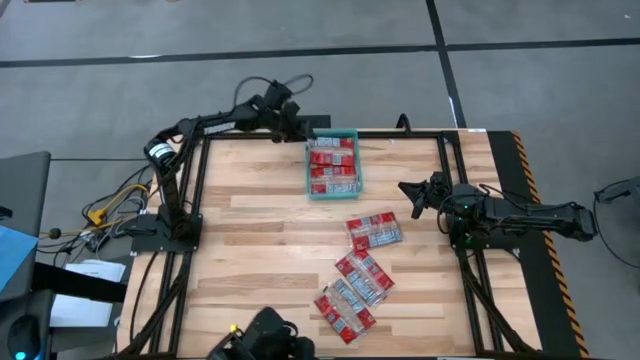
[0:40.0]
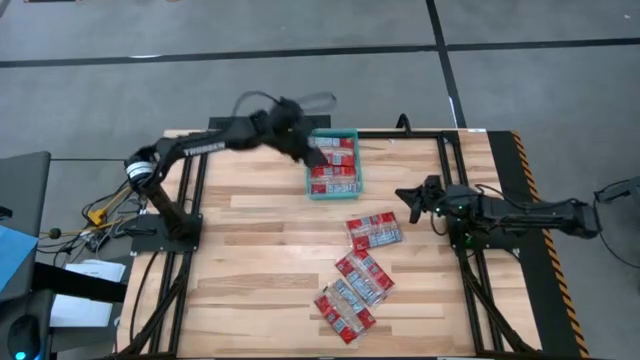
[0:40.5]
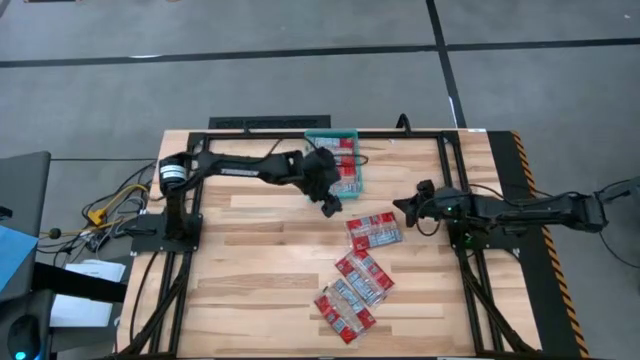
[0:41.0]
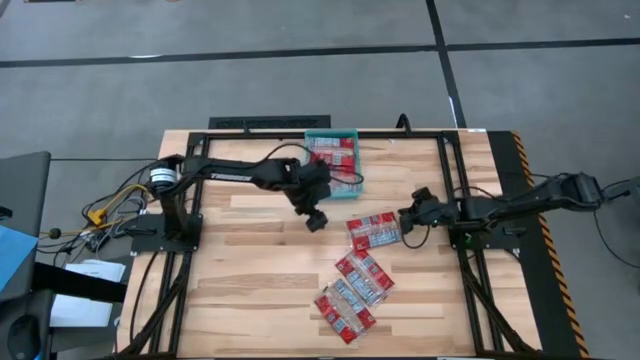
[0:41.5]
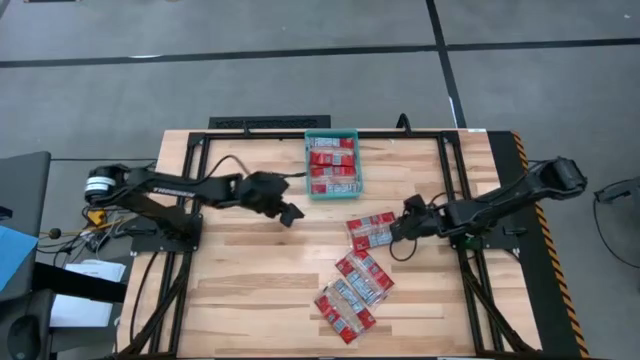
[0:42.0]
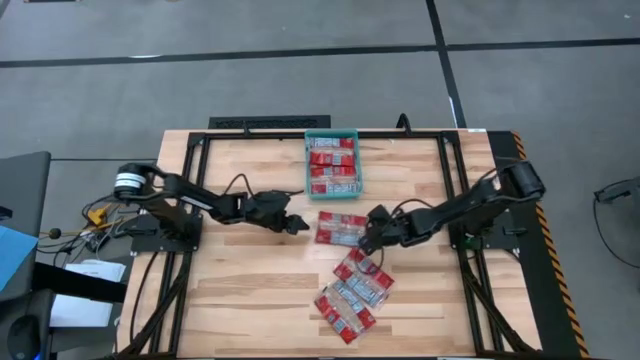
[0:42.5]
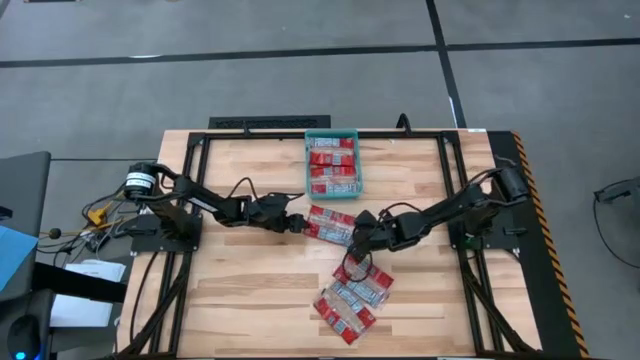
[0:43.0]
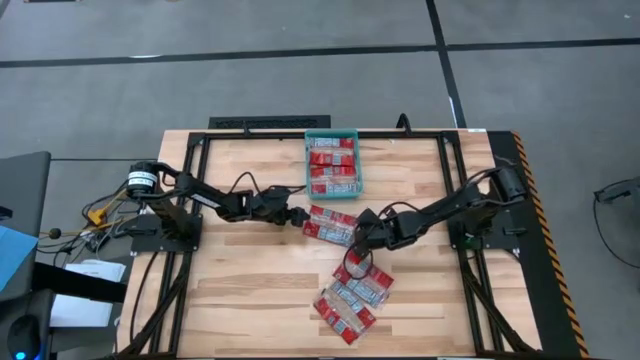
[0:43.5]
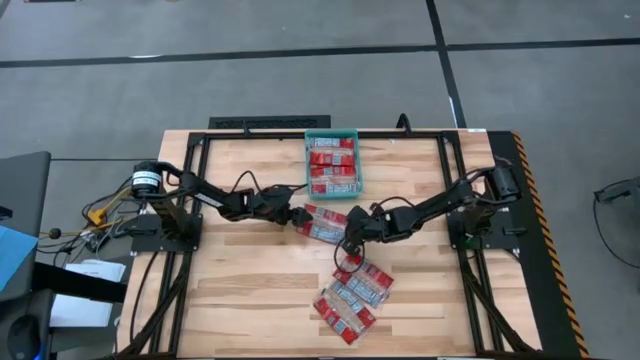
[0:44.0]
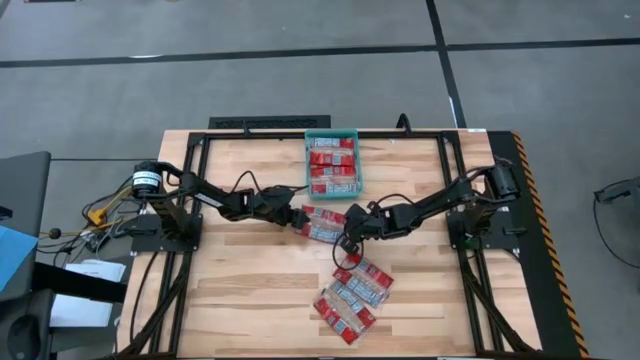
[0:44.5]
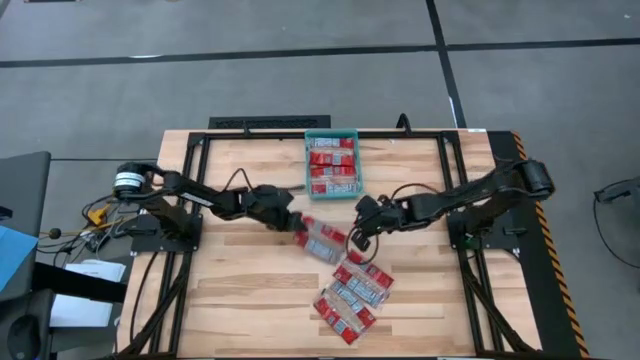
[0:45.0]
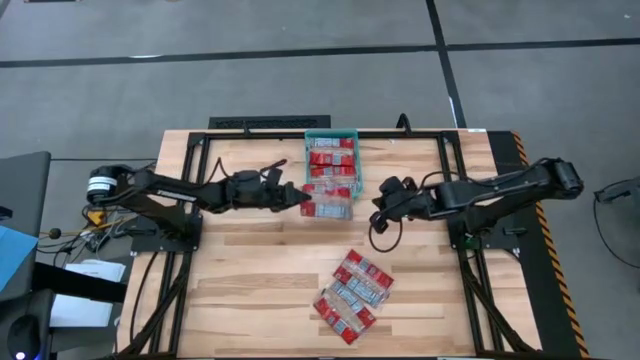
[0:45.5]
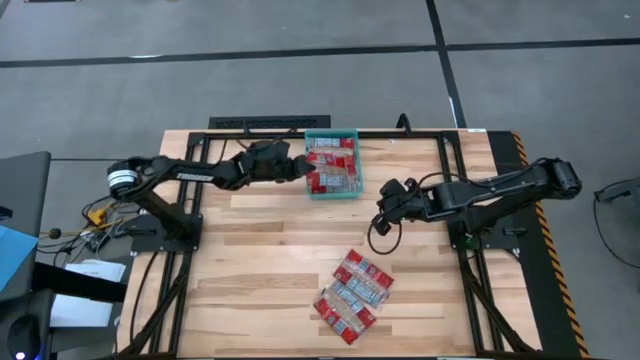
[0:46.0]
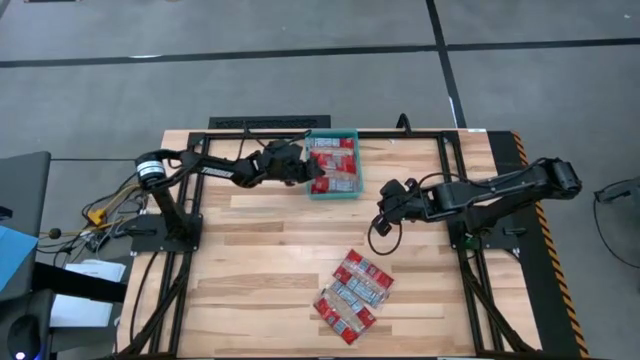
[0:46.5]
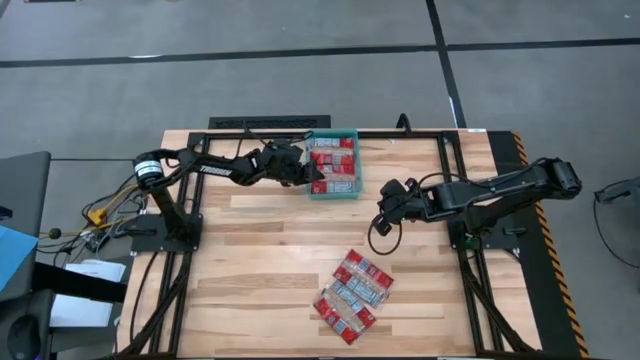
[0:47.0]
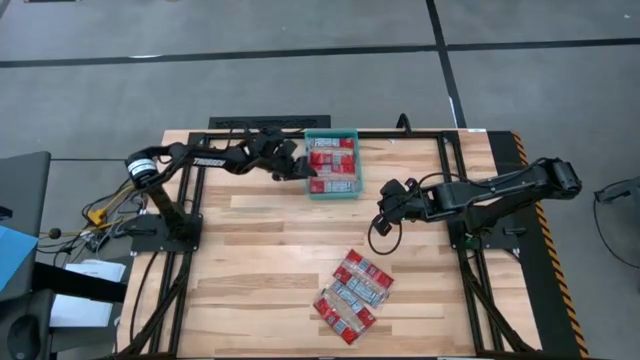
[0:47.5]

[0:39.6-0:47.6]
Task: Sort popcorn bags into baskets
Put the red popcorn bag into the green bin

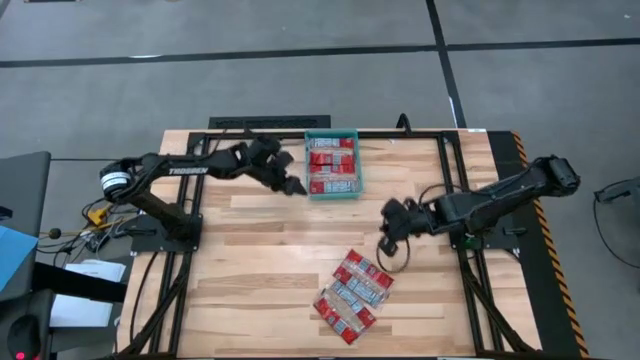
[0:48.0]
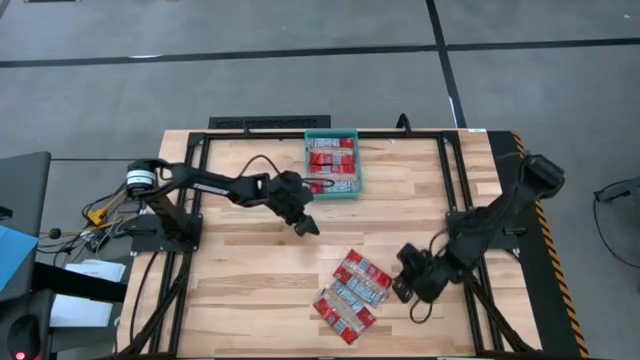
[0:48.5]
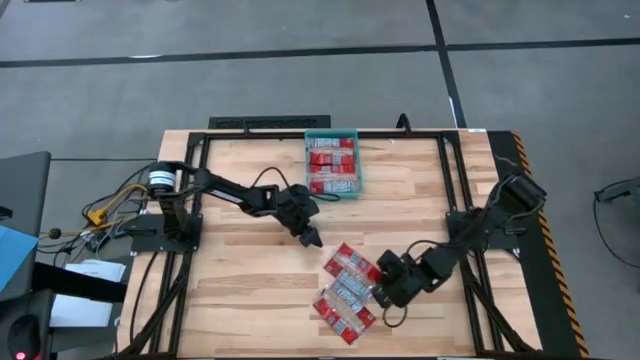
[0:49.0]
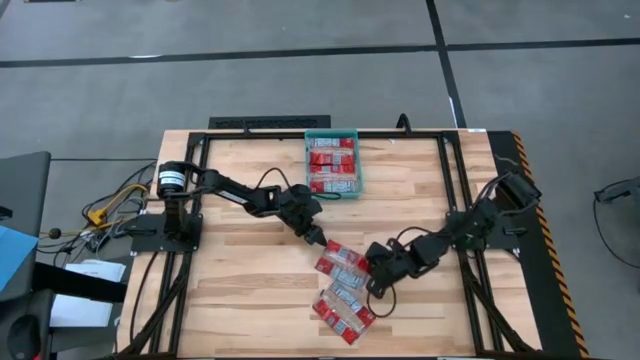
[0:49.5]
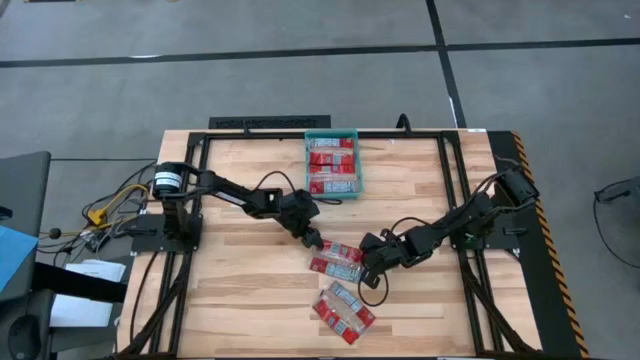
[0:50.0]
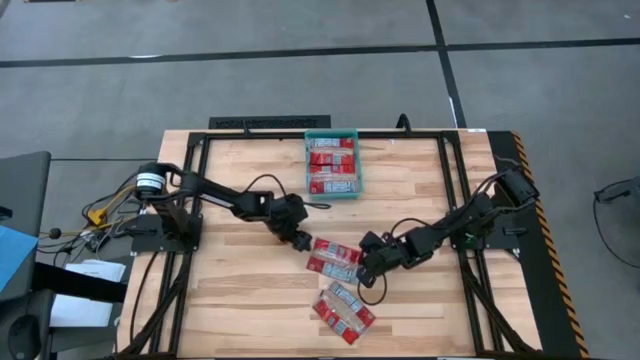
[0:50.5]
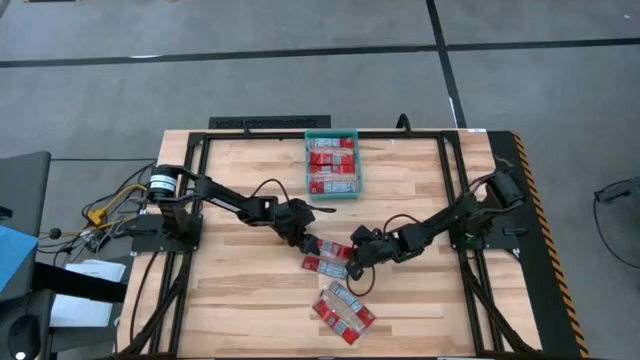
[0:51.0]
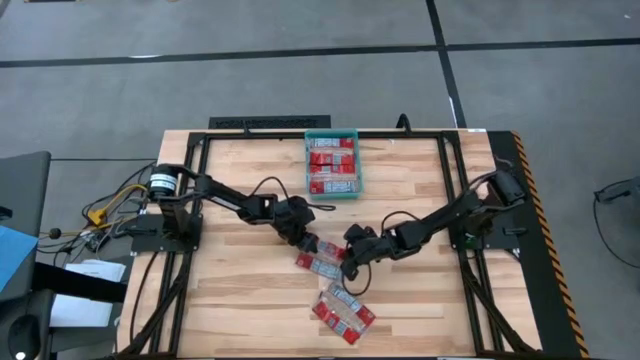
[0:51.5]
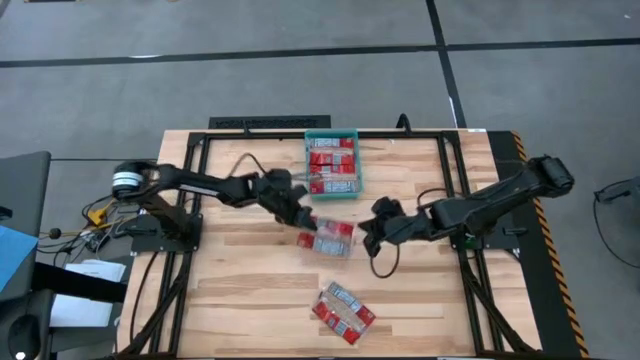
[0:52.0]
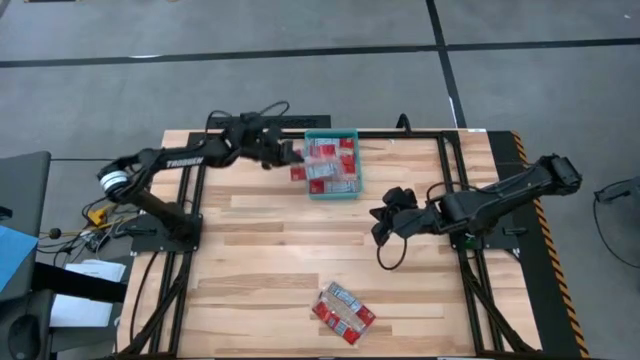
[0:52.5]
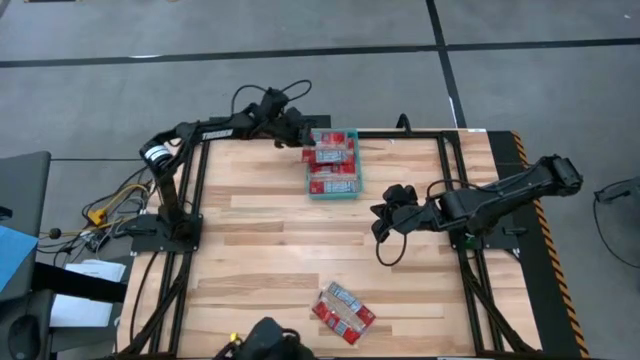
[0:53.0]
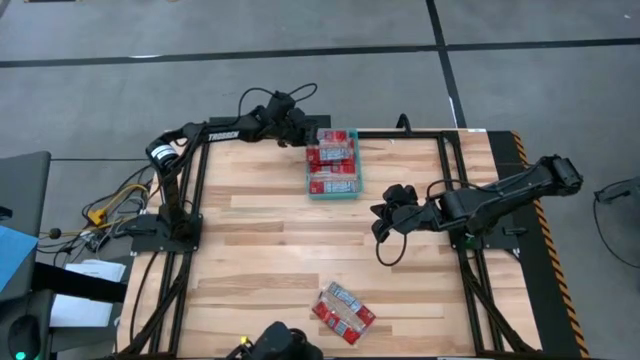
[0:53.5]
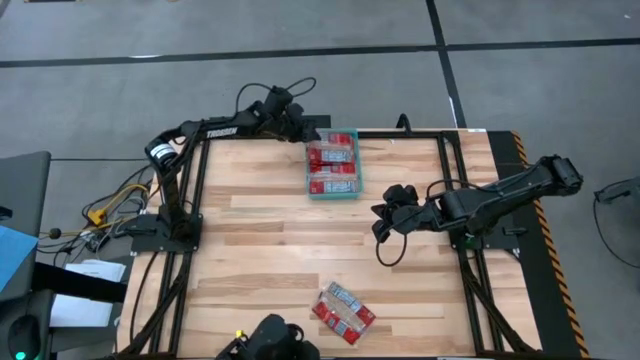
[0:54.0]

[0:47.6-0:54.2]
Put the red popcorn bag into the green bin

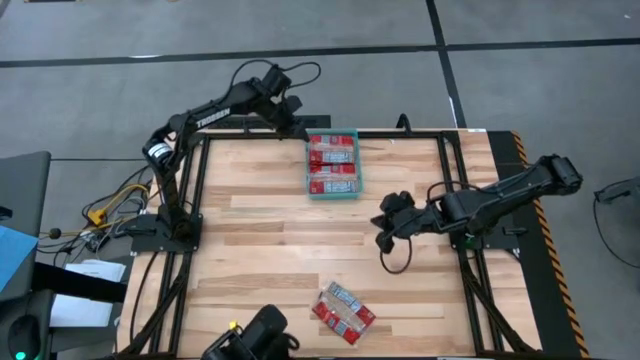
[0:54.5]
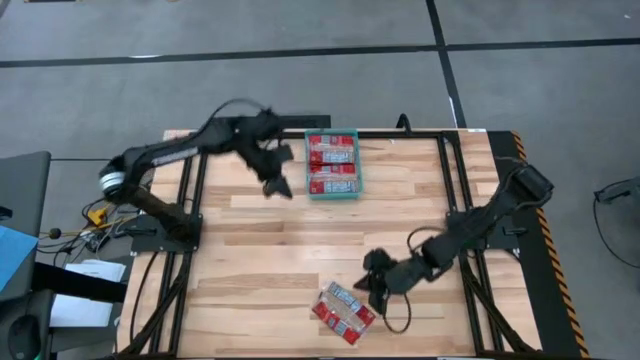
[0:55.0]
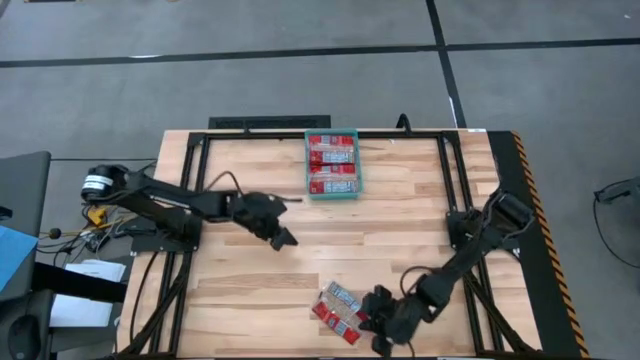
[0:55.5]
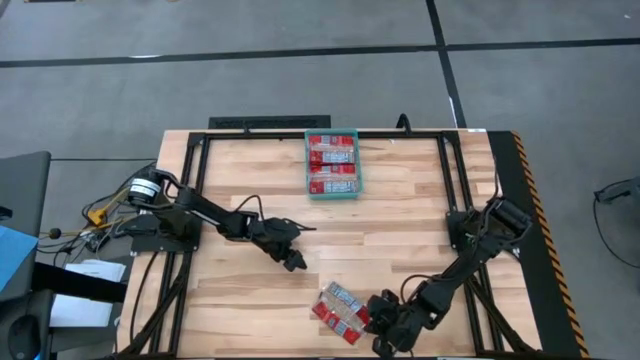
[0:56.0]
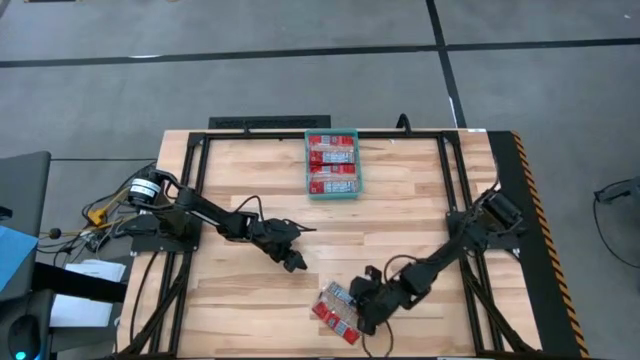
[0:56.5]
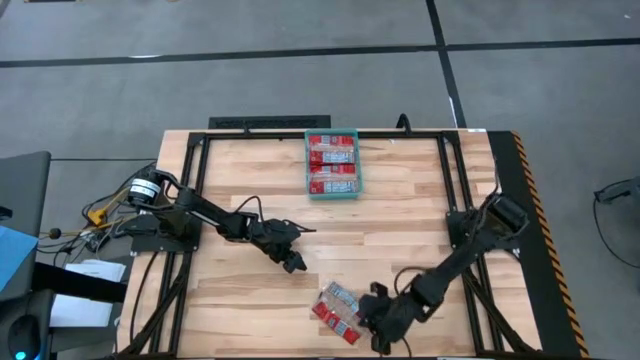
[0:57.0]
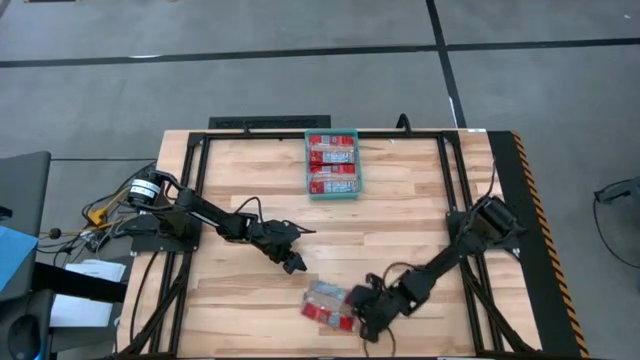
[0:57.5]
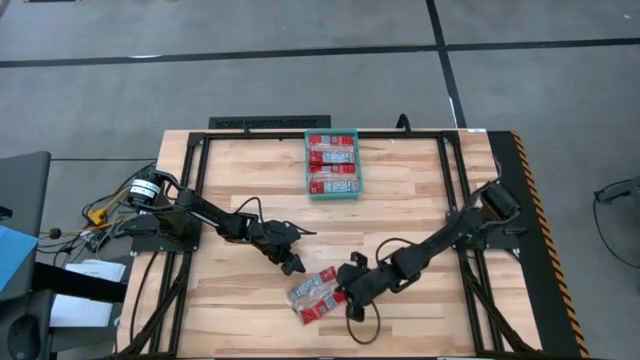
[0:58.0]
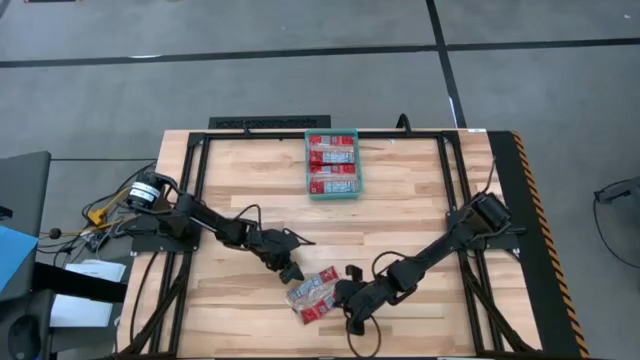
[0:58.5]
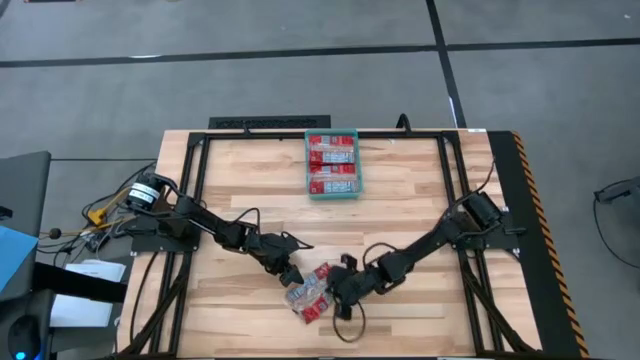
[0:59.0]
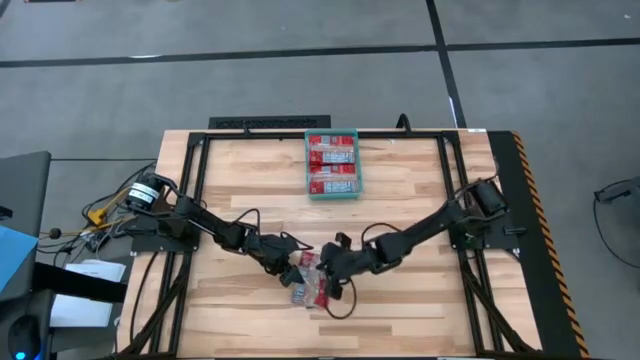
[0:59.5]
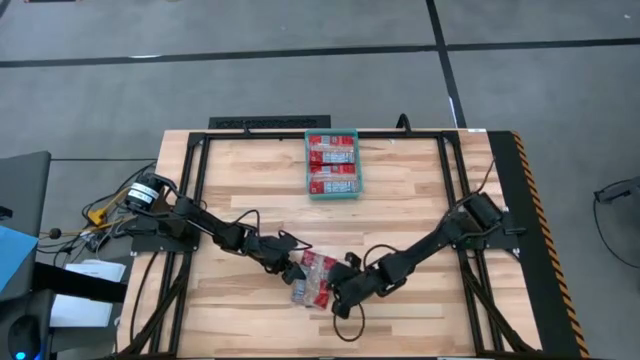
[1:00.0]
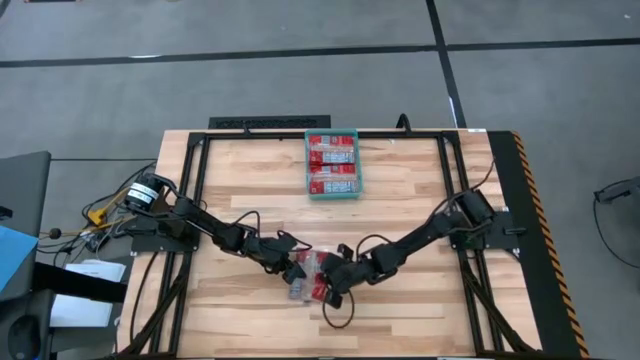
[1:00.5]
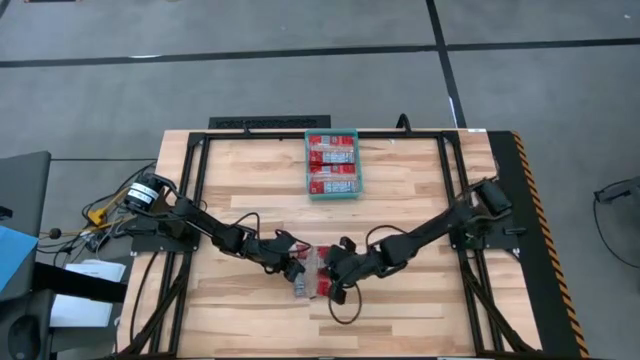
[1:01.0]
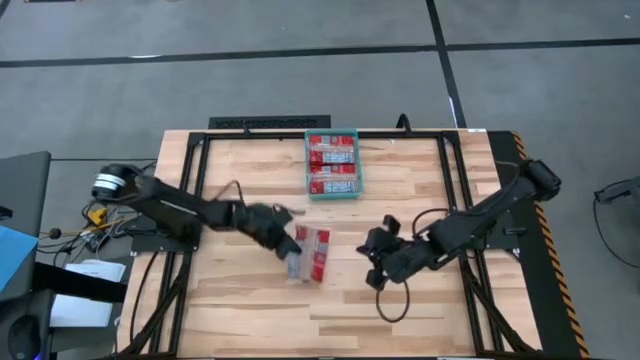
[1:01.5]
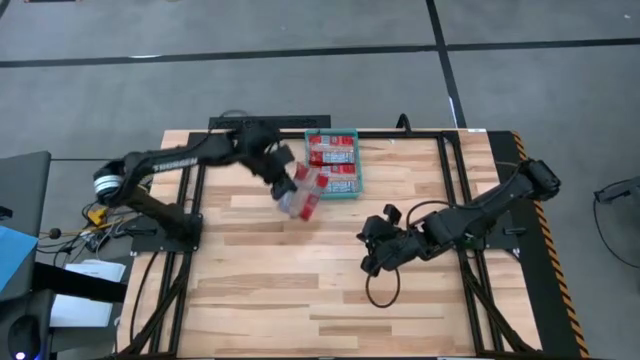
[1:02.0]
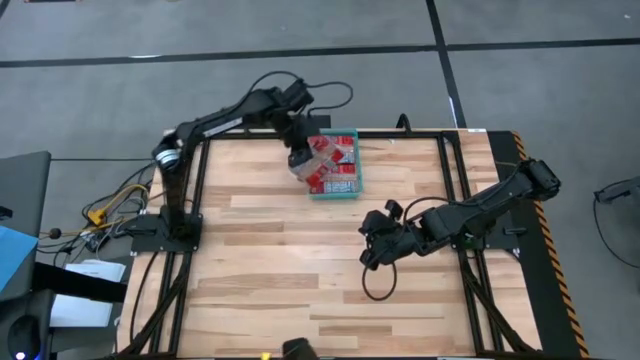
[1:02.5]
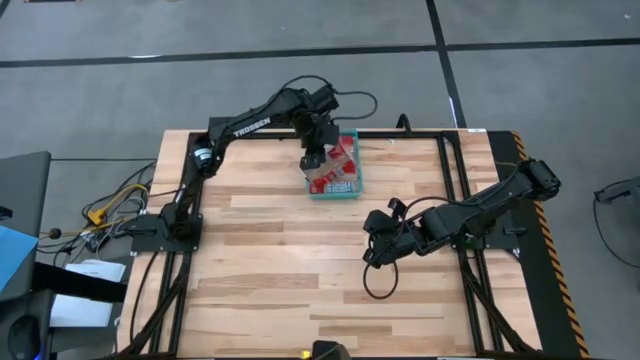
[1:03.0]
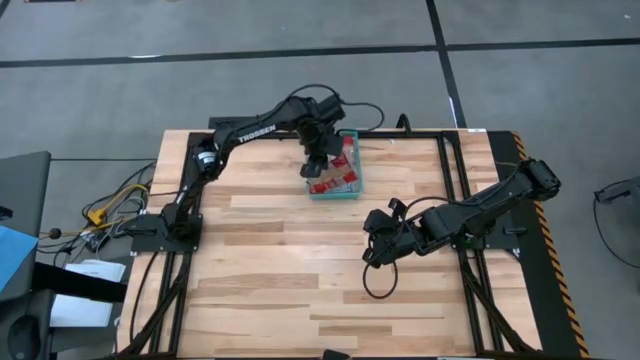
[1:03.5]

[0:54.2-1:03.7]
Put the red popcorn bag into the green bin
